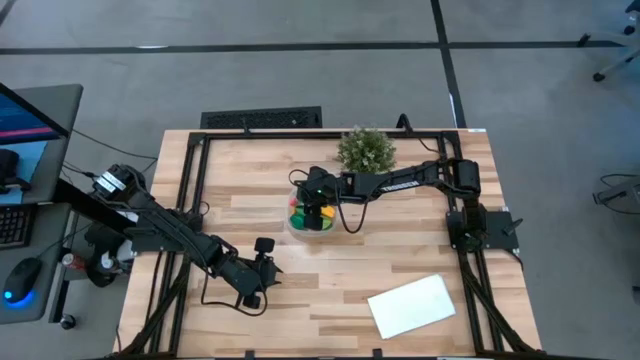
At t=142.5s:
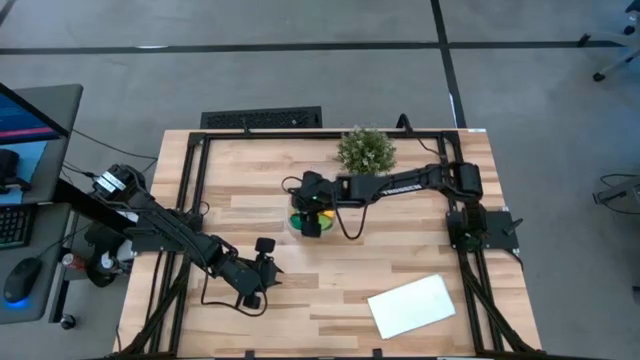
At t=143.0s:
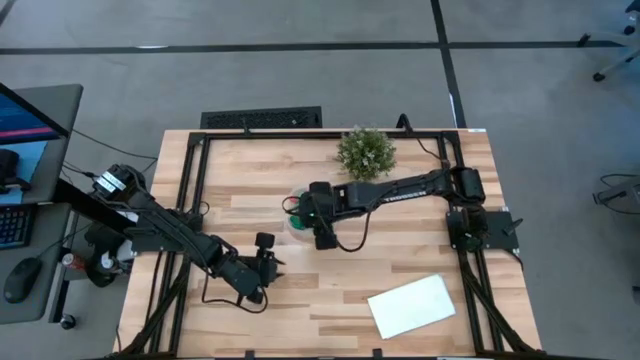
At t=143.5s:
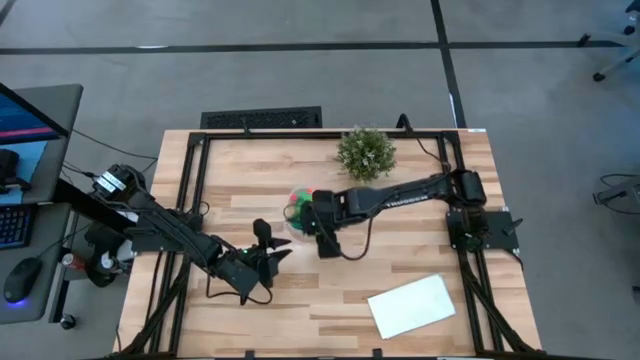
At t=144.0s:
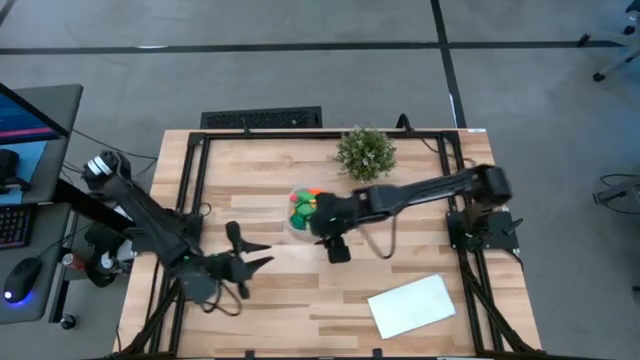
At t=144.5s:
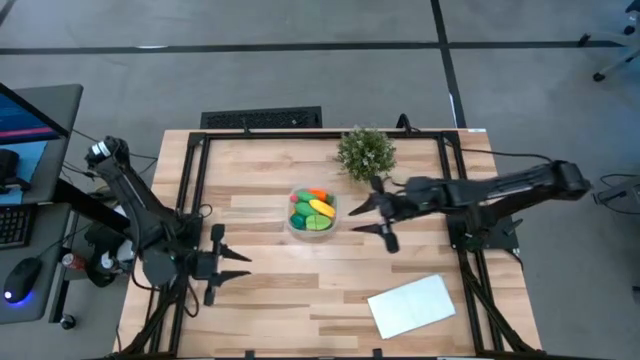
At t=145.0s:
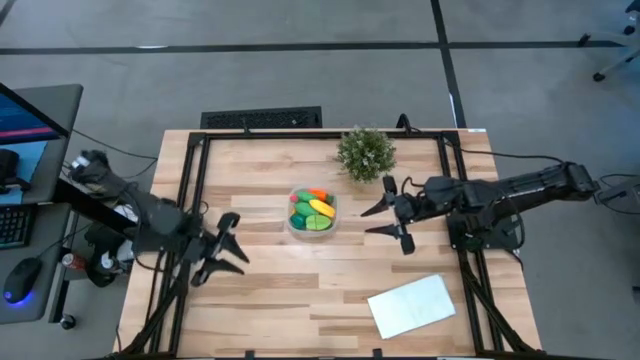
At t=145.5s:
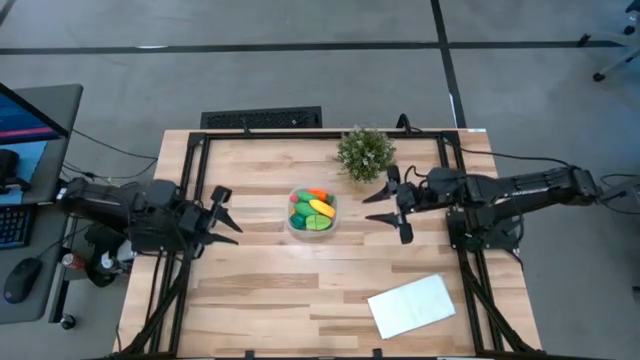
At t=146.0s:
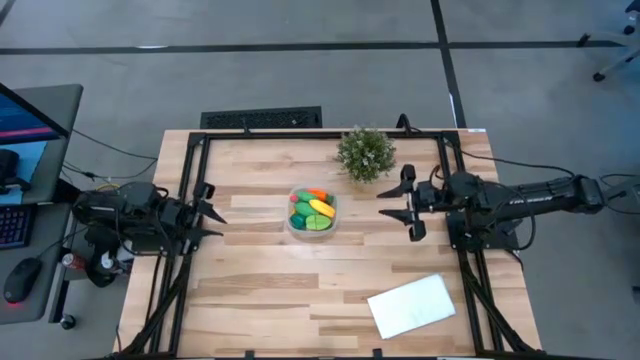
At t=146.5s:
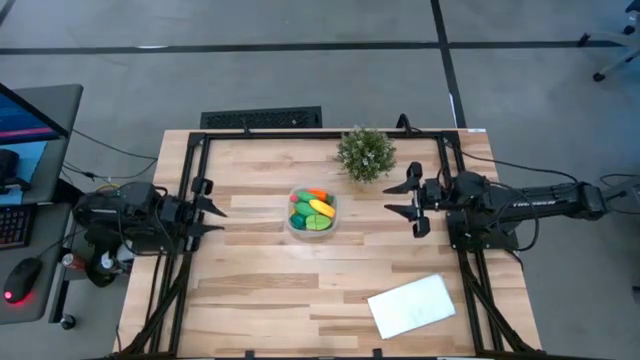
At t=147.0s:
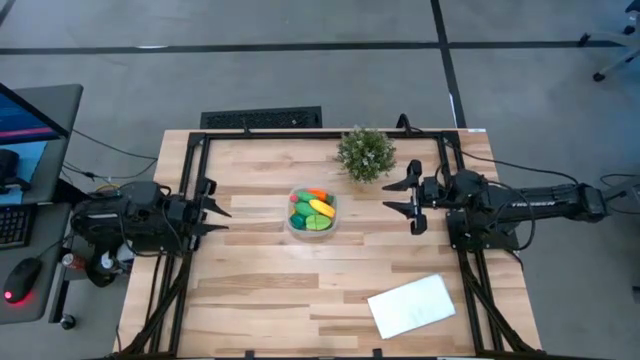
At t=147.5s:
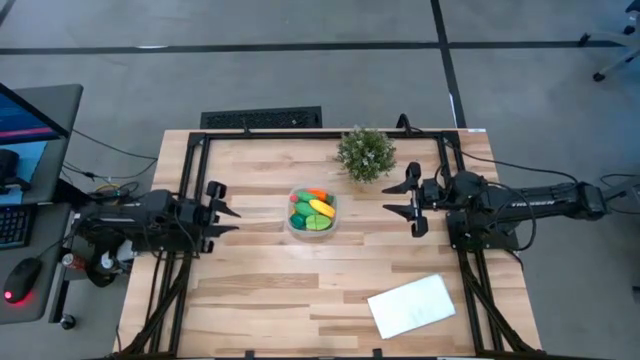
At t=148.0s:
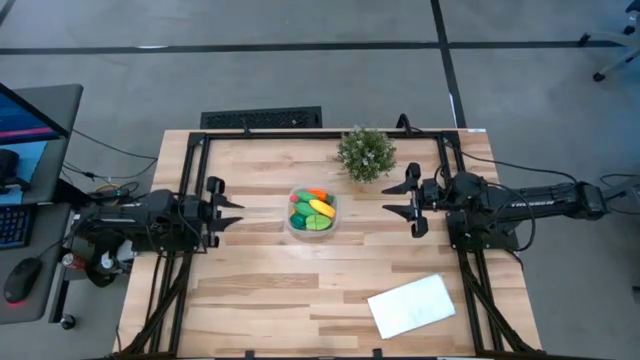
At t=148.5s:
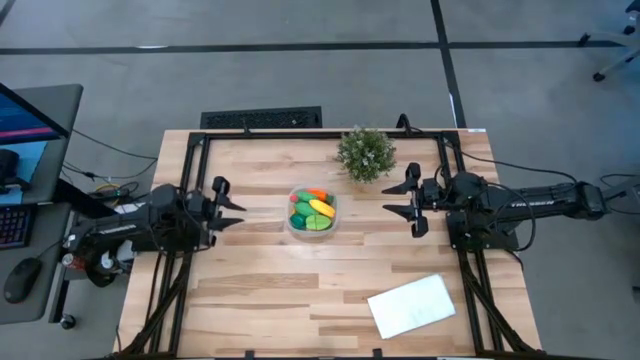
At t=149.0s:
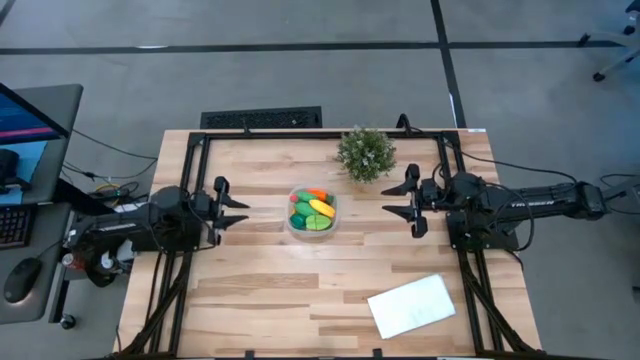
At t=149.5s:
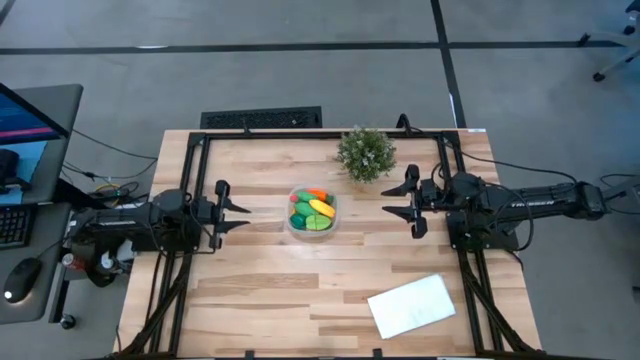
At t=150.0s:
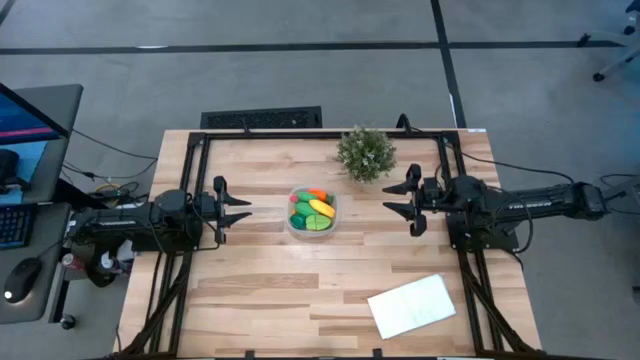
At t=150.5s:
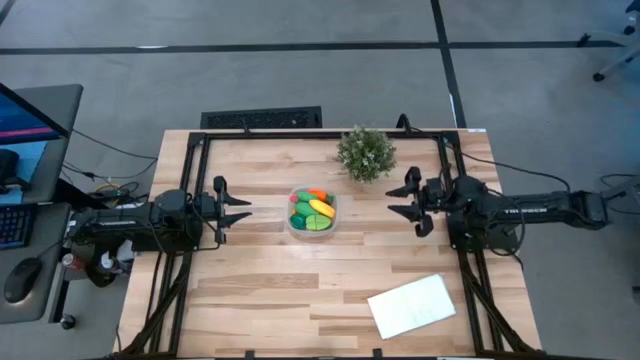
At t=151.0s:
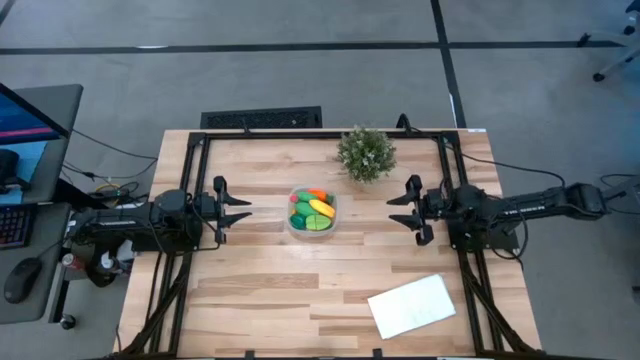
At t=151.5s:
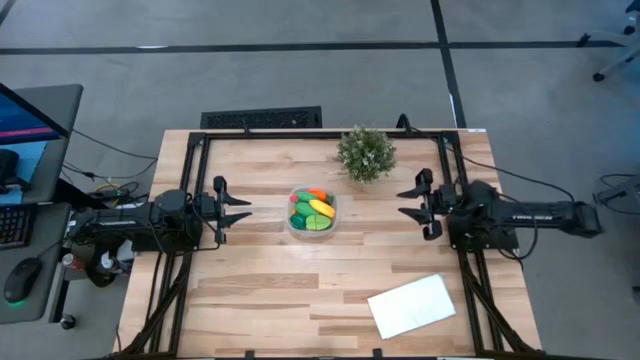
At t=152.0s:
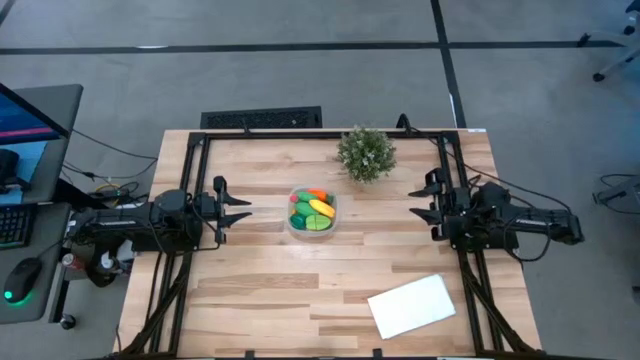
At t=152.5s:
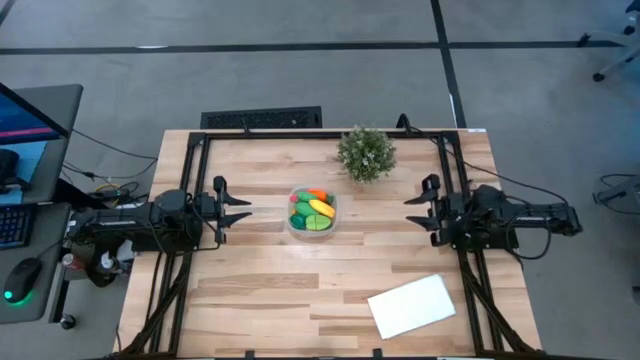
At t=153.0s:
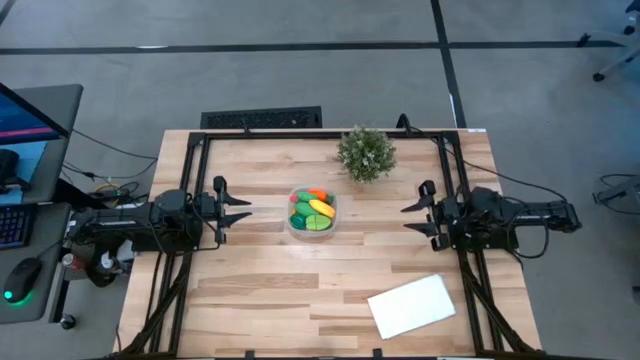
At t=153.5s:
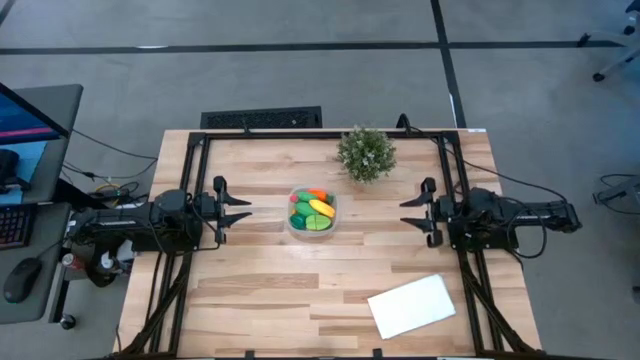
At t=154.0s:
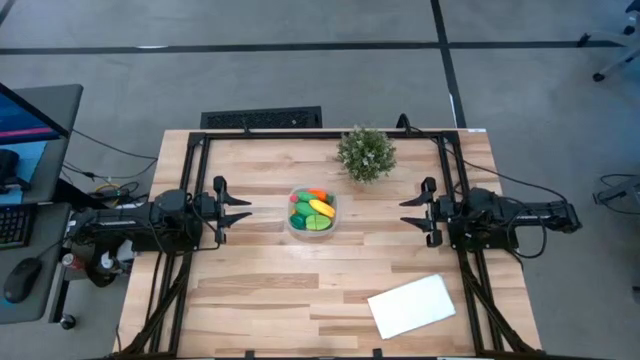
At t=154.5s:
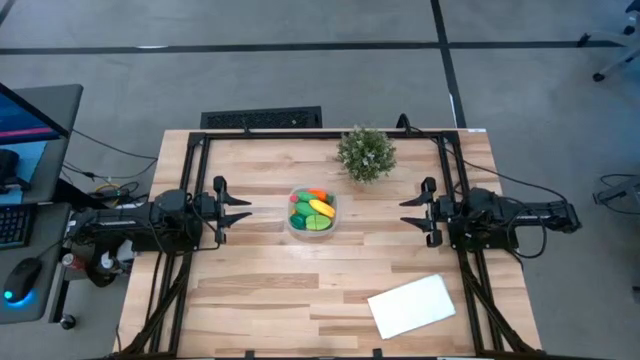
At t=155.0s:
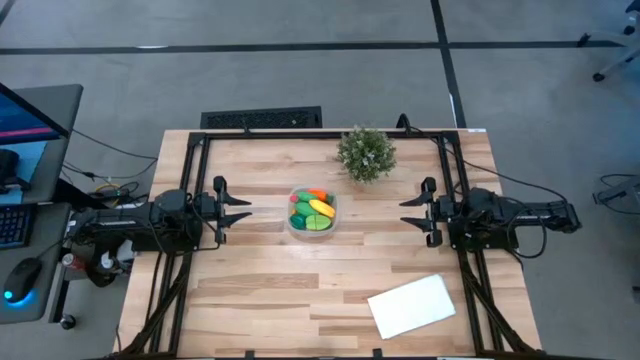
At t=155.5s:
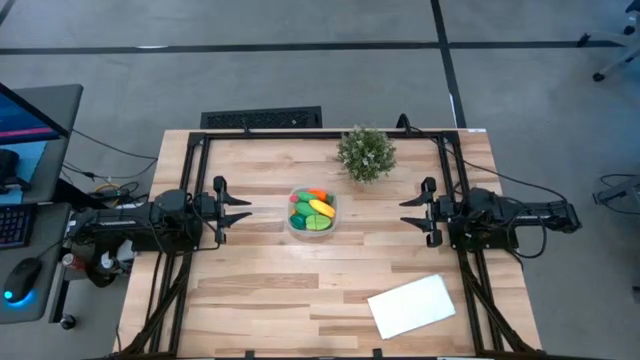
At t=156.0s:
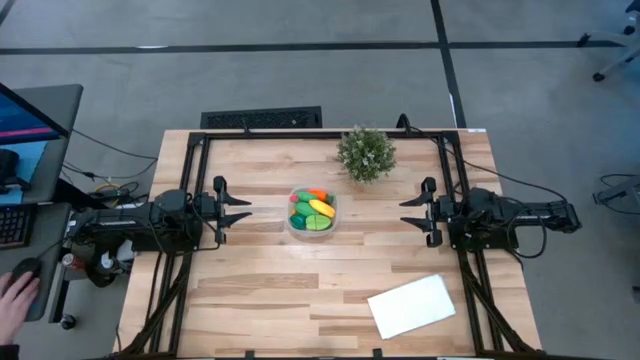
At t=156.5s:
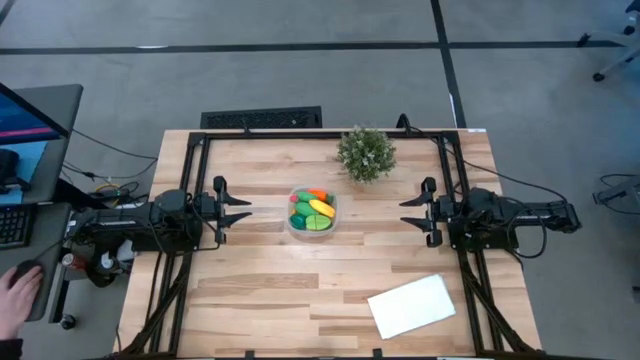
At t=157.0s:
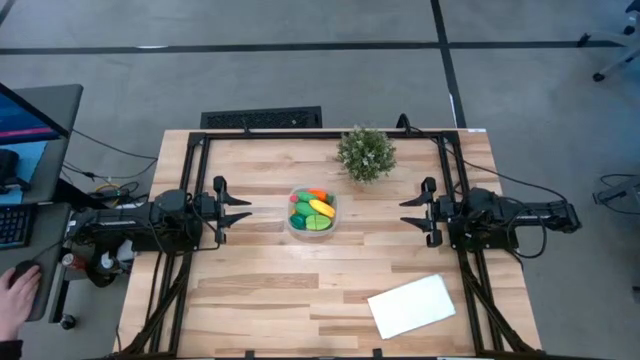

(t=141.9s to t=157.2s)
Task: Pick and placing Produce into tupperware
Return to Home Position

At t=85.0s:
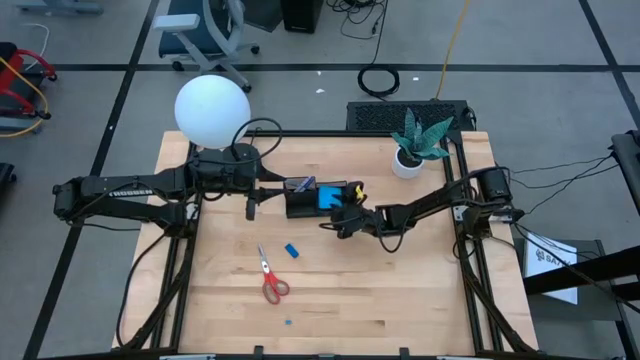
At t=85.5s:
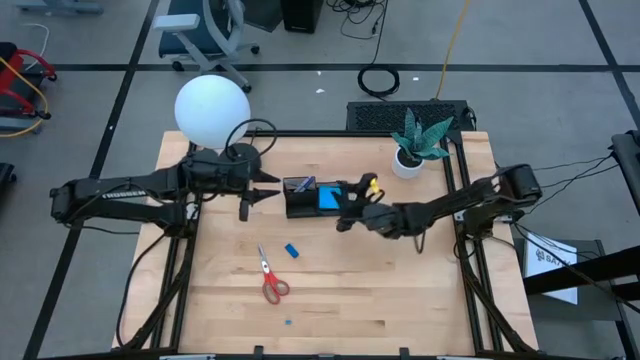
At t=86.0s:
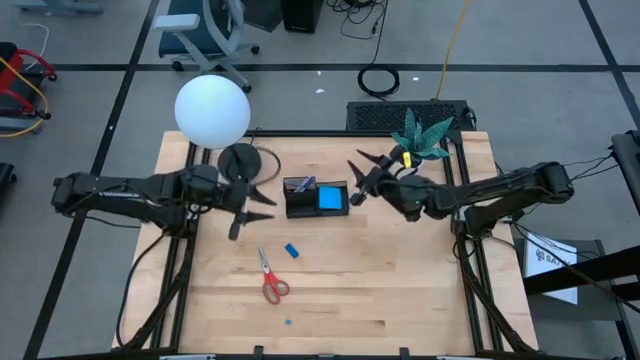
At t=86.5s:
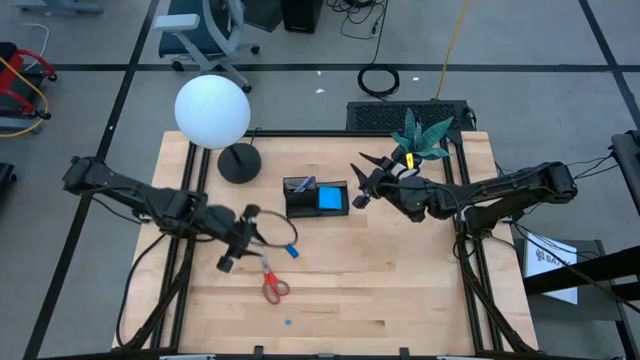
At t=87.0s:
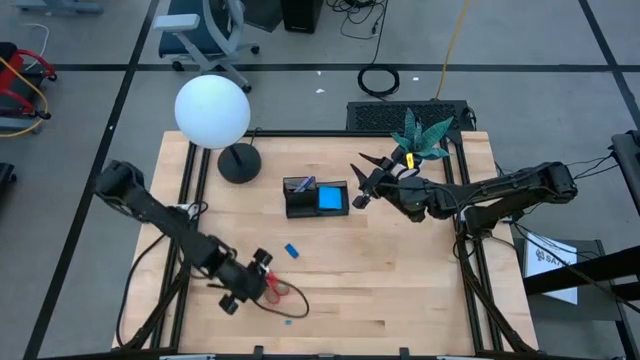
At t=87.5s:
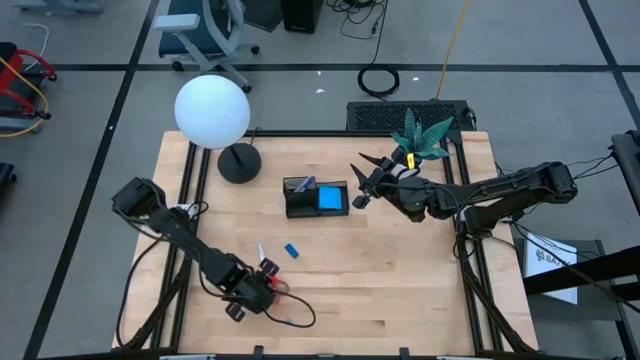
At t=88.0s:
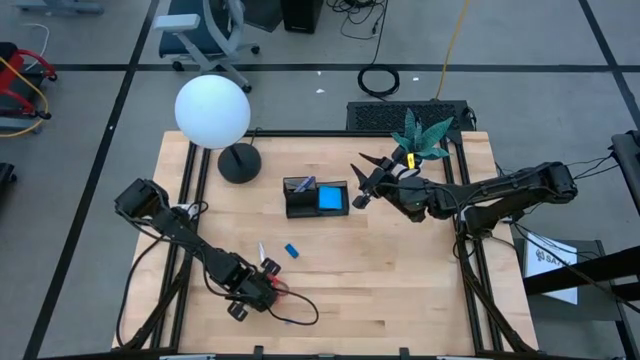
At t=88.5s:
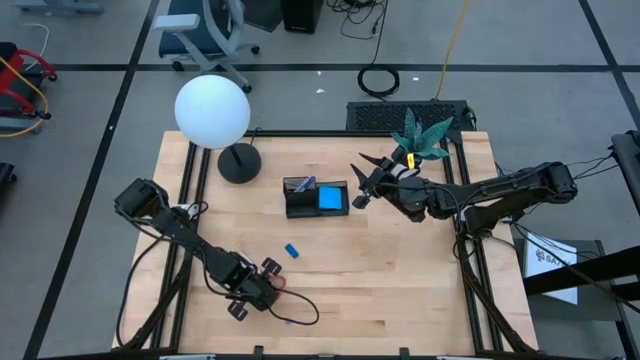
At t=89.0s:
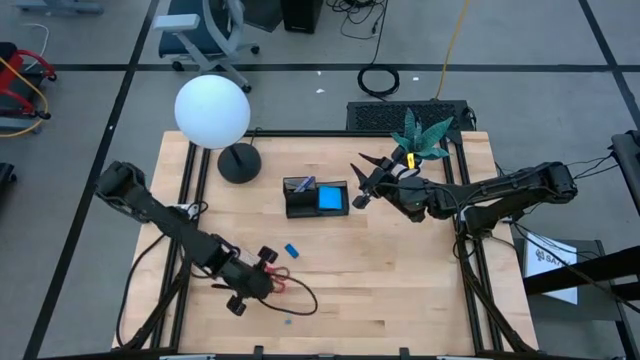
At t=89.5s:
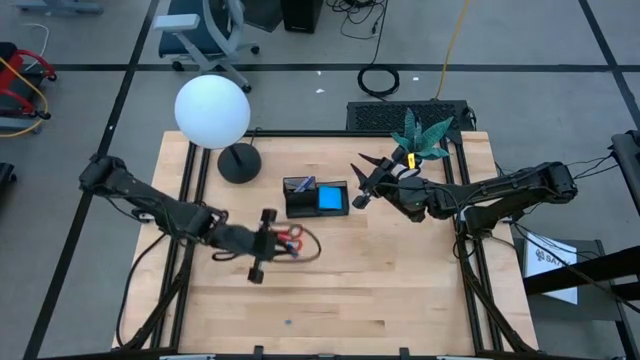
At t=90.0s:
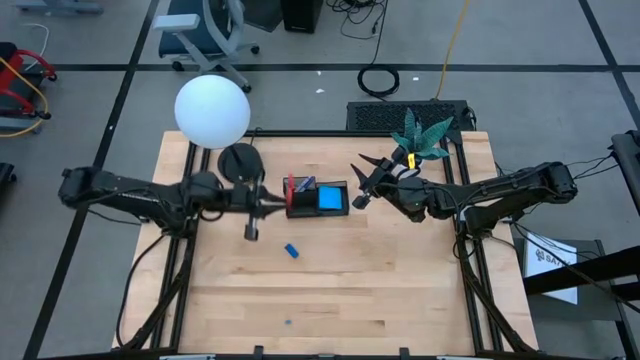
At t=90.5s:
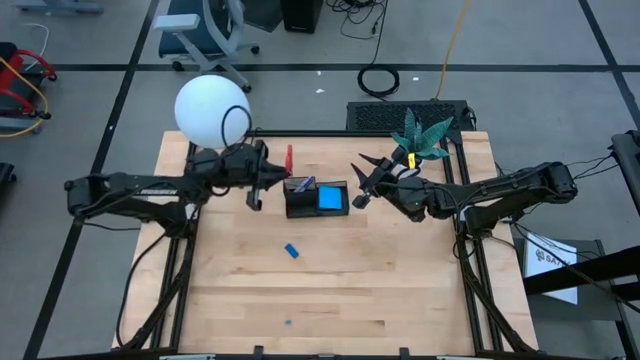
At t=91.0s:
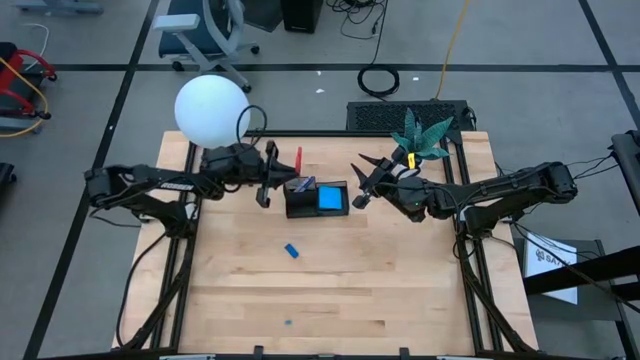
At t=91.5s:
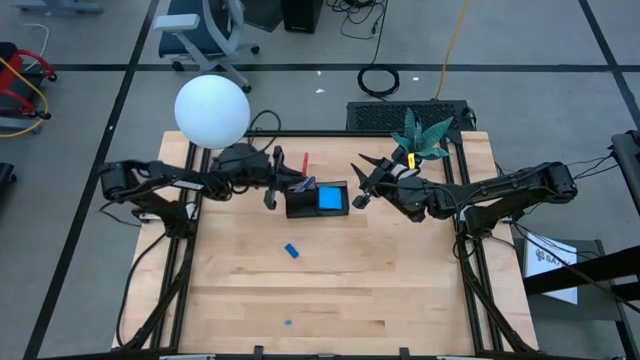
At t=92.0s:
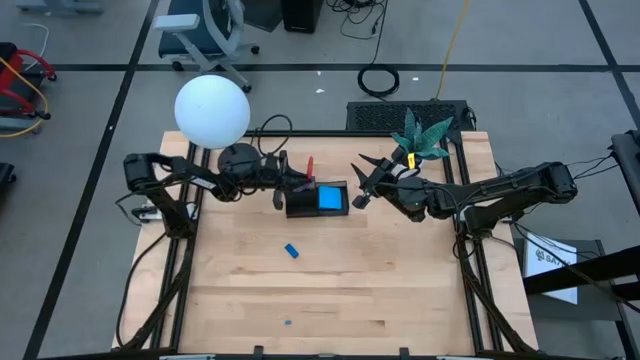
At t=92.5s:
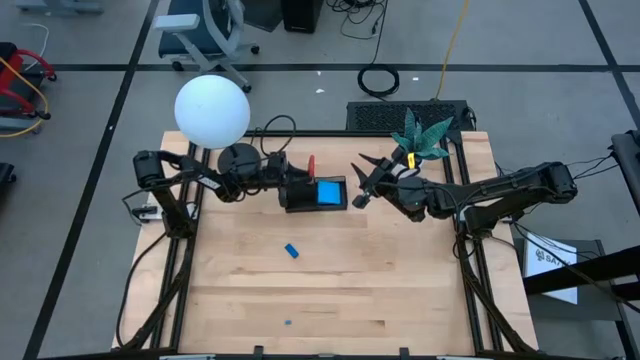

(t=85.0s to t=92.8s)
Task: Pick and place office supplies into organizer
Put the orange scissors into the black mesh organizer
